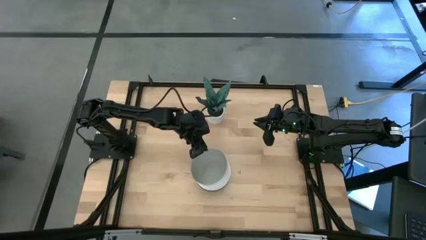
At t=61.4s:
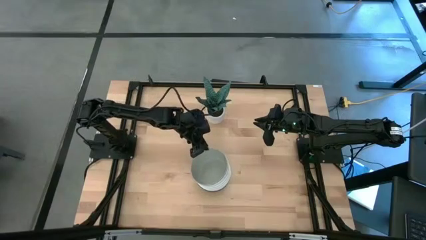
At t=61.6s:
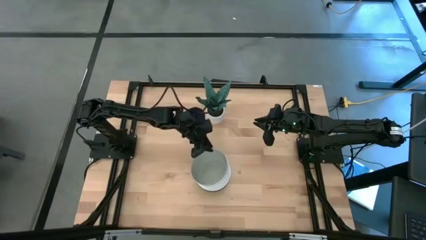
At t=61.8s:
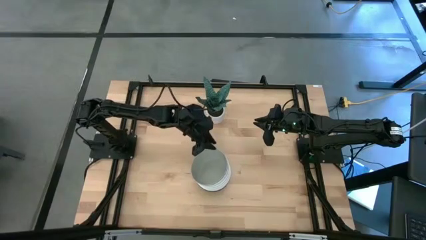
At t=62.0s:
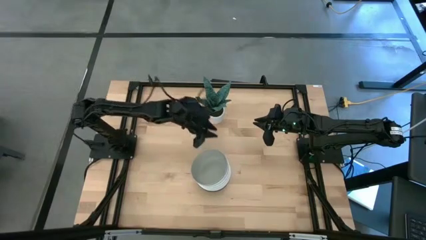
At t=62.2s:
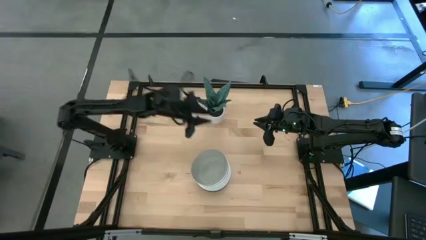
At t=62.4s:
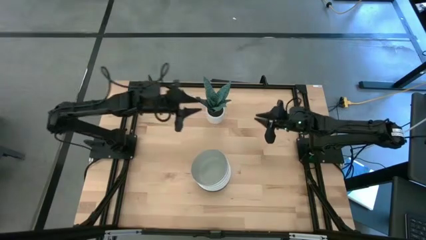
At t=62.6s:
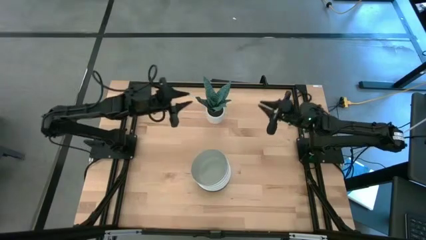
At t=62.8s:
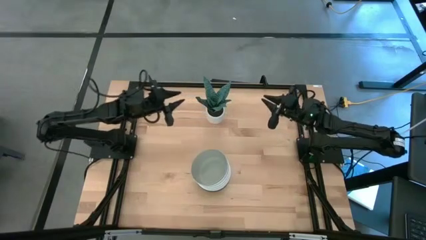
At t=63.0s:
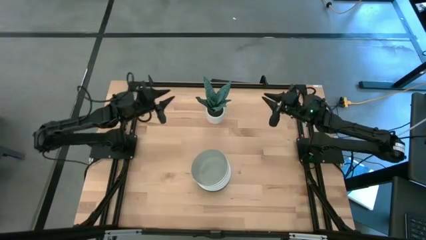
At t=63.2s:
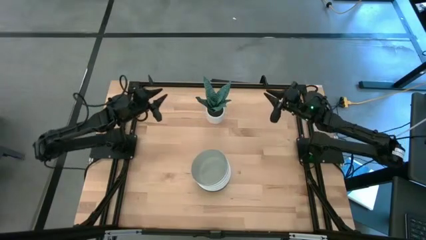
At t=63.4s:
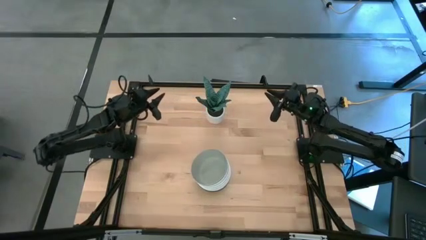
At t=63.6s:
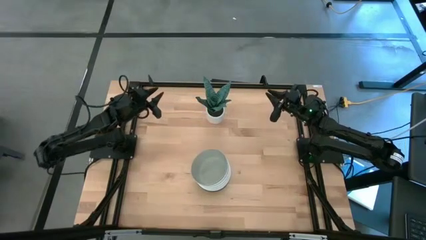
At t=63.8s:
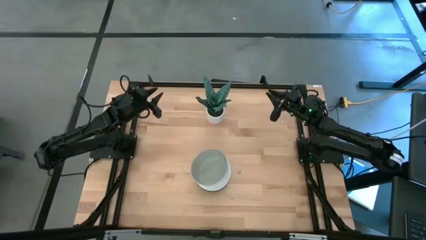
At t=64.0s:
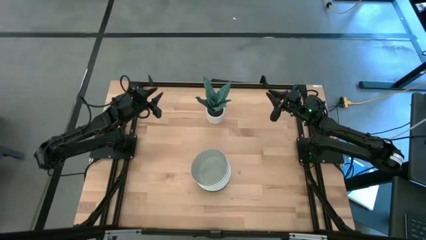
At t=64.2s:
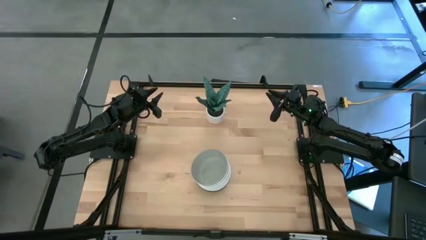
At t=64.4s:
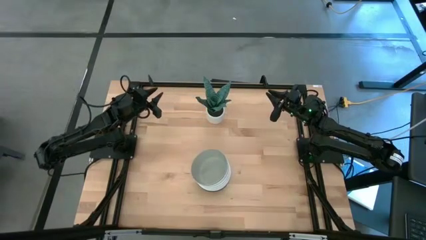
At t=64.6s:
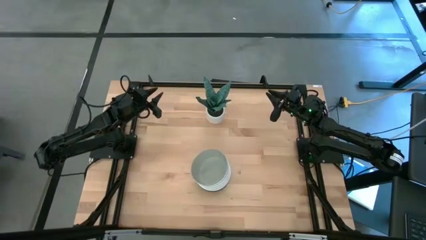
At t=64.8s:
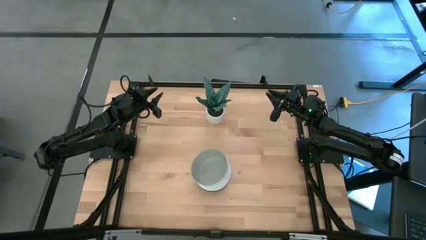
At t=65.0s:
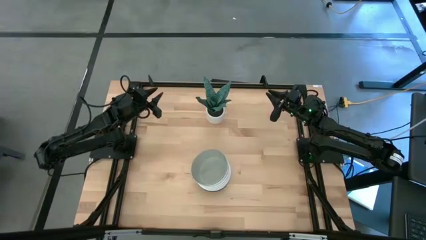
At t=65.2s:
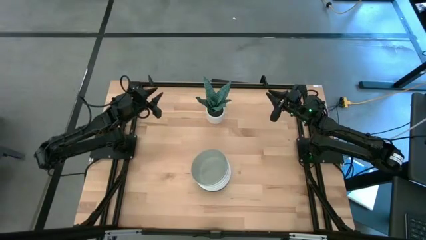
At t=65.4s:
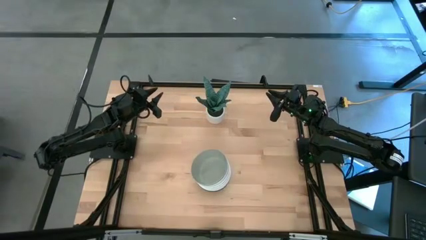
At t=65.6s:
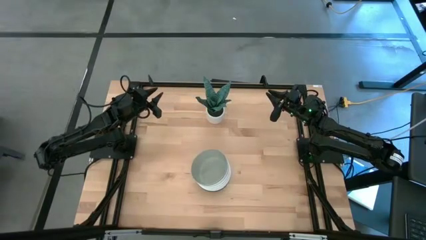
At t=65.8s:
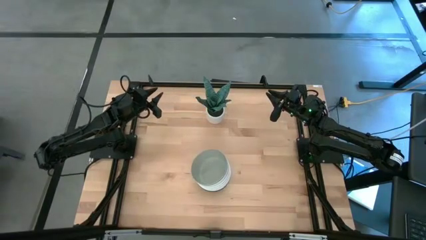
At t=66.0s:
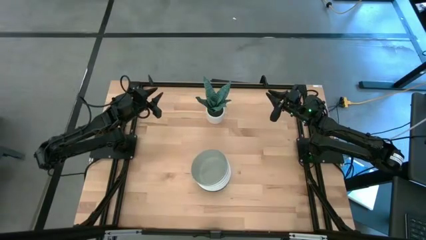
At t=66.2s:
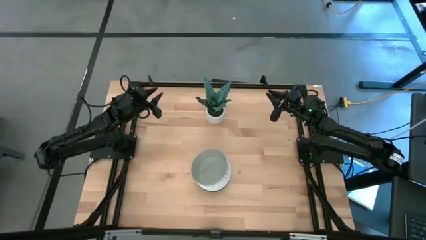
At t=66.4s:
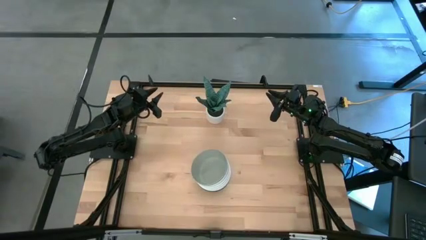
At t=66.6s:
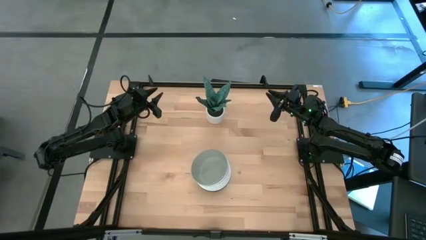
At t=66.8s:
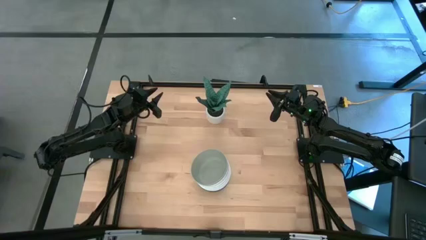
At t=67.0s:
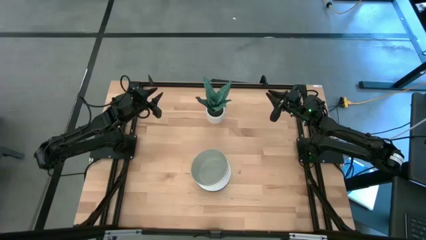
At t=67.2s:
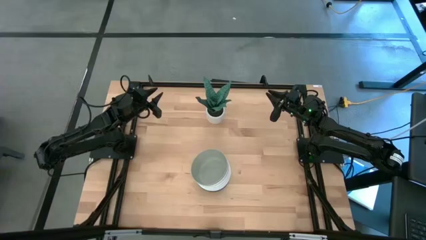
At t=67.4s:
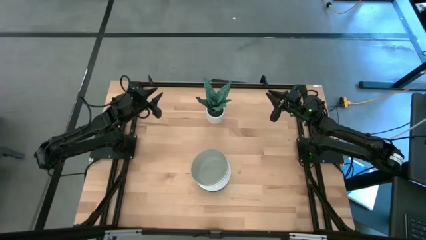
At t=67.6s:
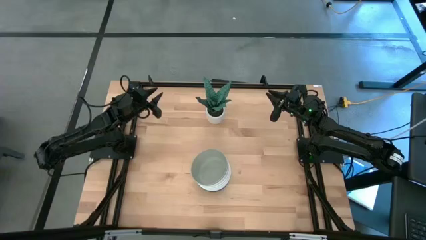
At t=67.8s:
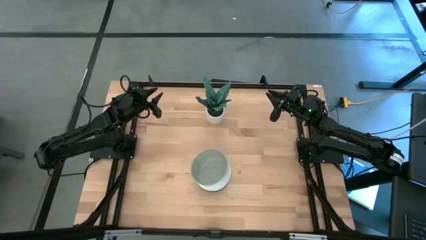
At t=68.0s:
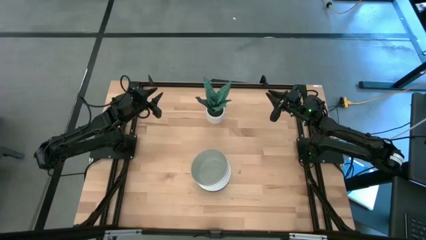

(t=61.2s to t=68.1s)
Task: Nest bowls inside each other
Return to Home Position

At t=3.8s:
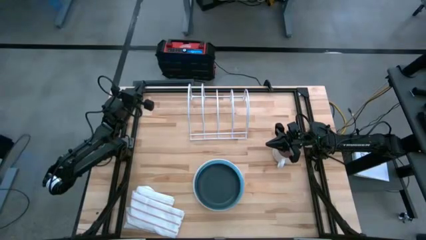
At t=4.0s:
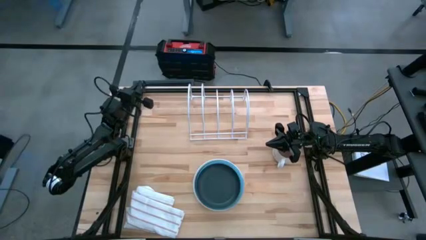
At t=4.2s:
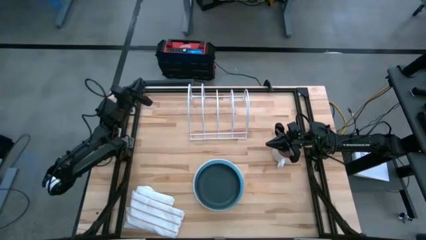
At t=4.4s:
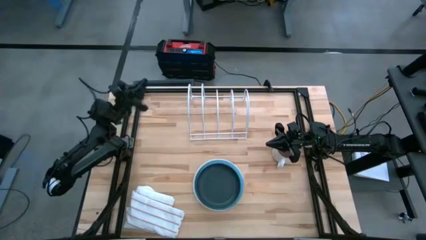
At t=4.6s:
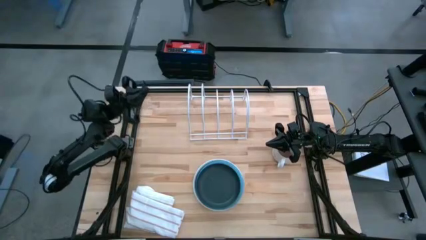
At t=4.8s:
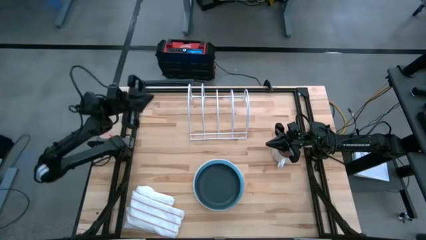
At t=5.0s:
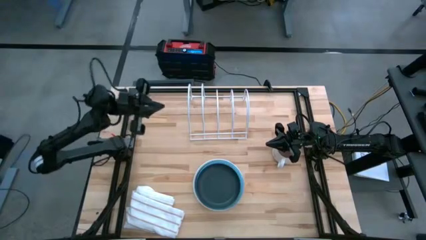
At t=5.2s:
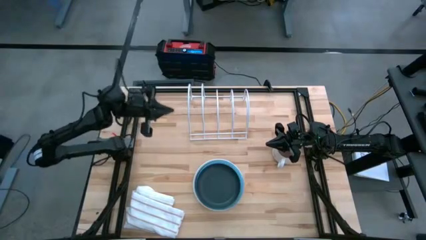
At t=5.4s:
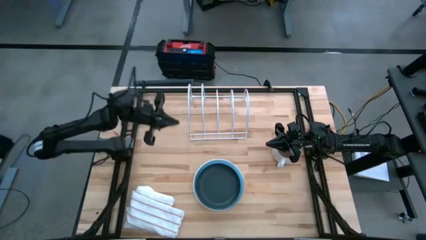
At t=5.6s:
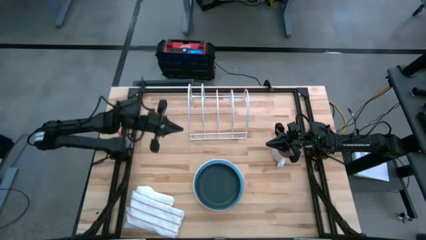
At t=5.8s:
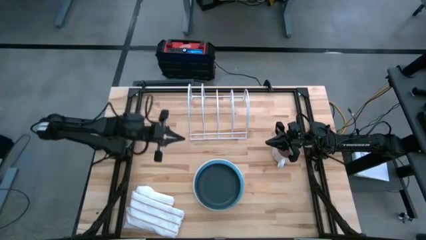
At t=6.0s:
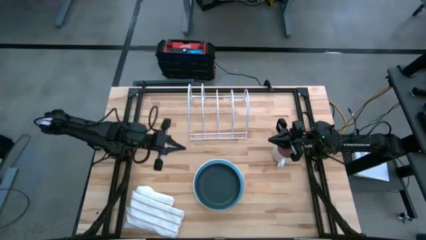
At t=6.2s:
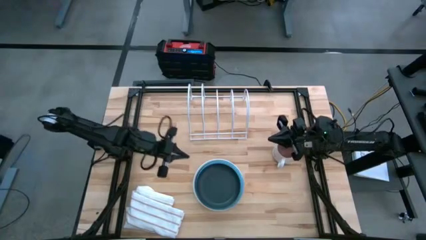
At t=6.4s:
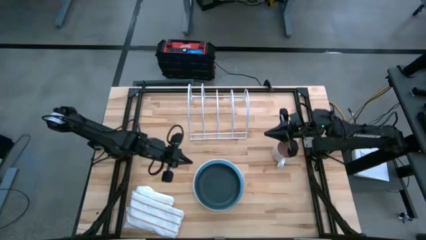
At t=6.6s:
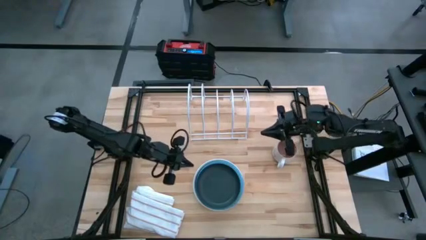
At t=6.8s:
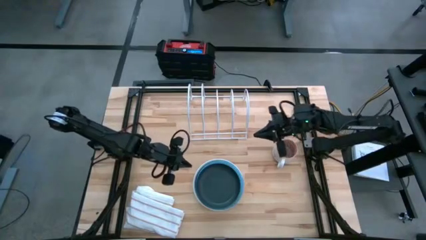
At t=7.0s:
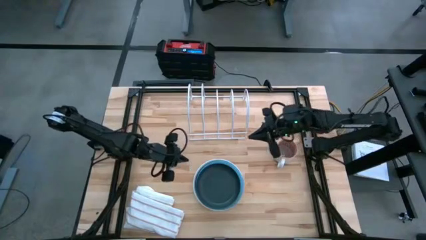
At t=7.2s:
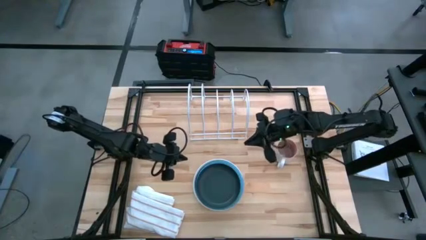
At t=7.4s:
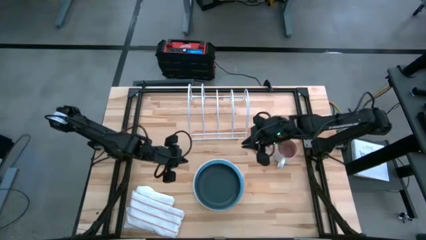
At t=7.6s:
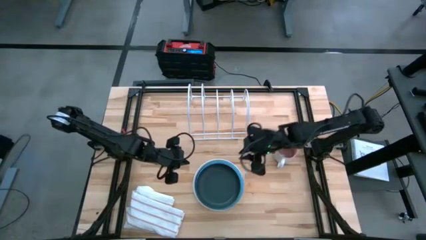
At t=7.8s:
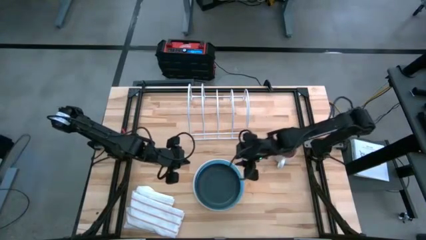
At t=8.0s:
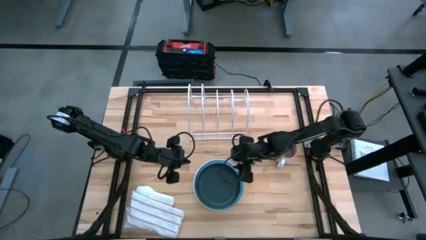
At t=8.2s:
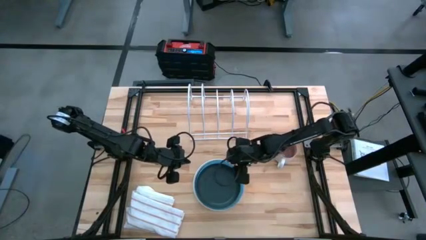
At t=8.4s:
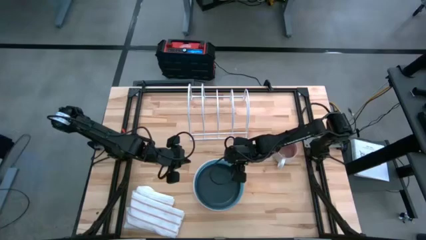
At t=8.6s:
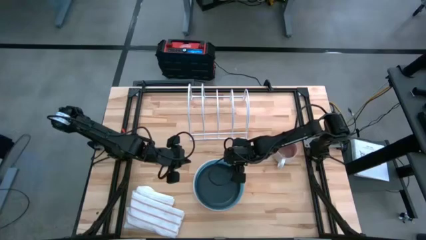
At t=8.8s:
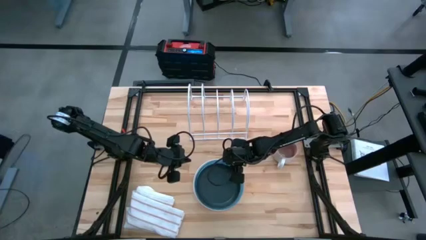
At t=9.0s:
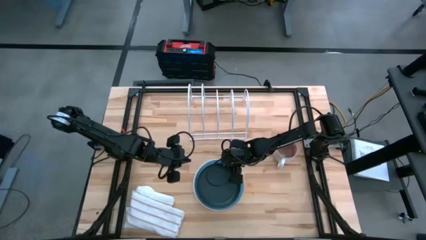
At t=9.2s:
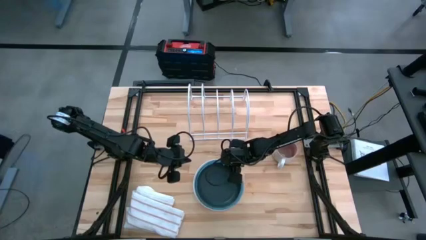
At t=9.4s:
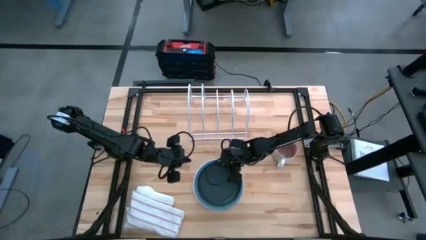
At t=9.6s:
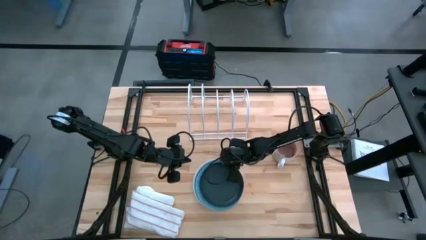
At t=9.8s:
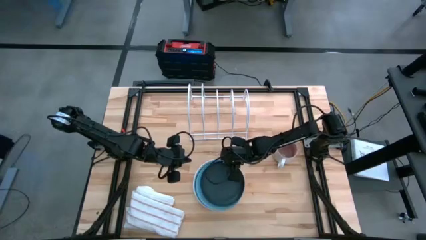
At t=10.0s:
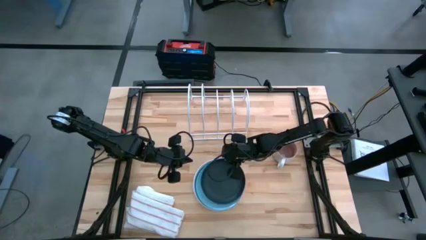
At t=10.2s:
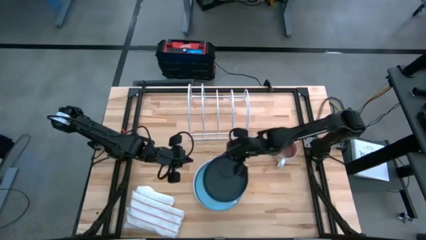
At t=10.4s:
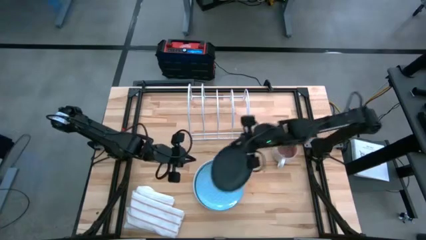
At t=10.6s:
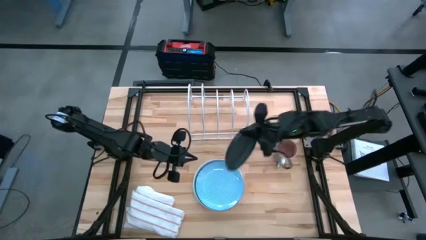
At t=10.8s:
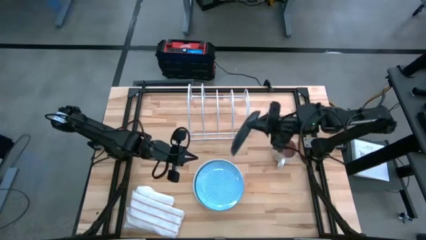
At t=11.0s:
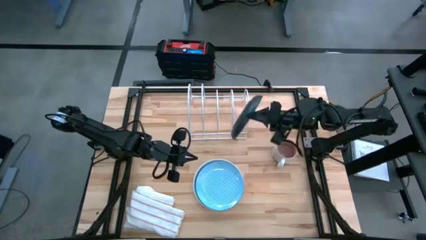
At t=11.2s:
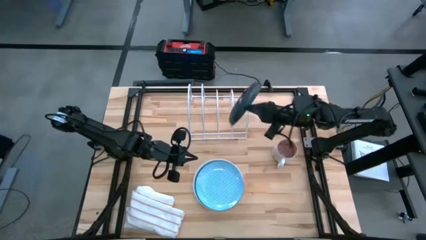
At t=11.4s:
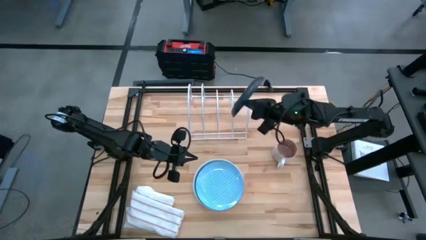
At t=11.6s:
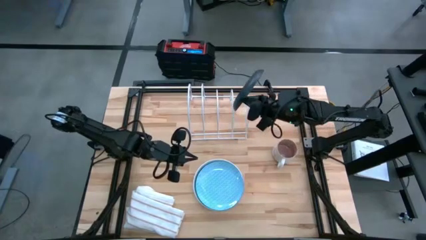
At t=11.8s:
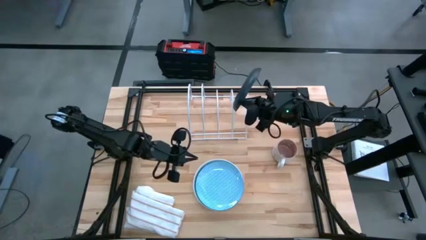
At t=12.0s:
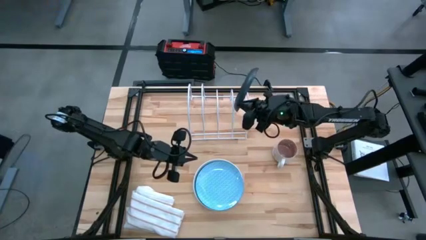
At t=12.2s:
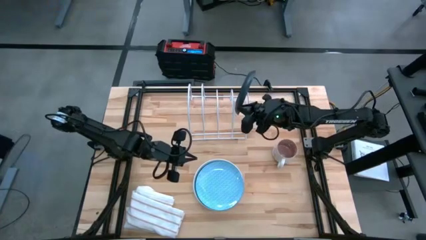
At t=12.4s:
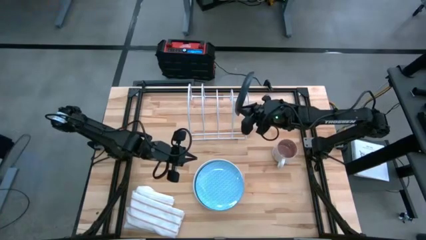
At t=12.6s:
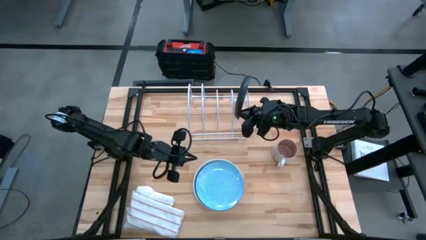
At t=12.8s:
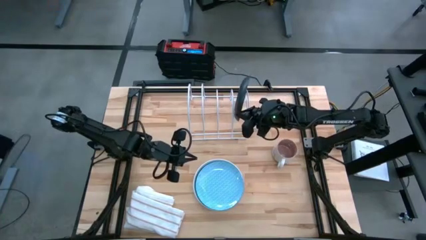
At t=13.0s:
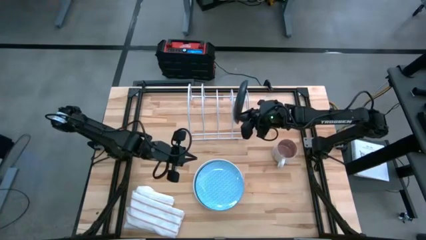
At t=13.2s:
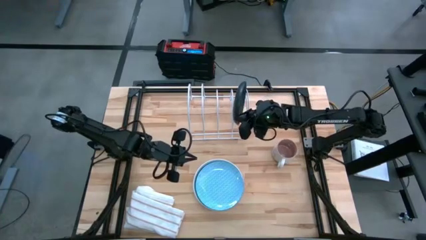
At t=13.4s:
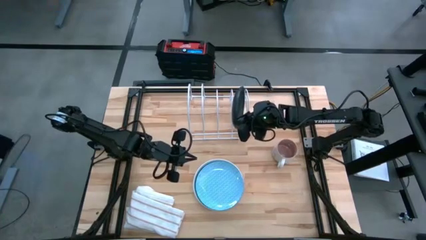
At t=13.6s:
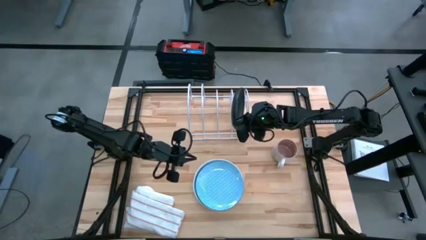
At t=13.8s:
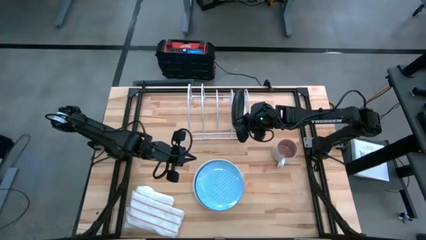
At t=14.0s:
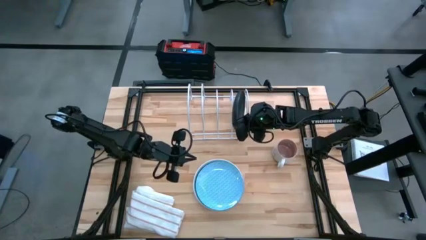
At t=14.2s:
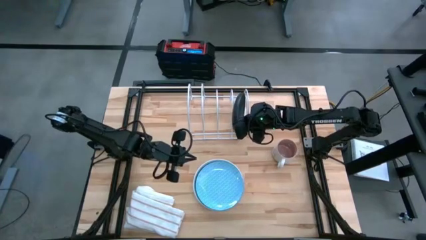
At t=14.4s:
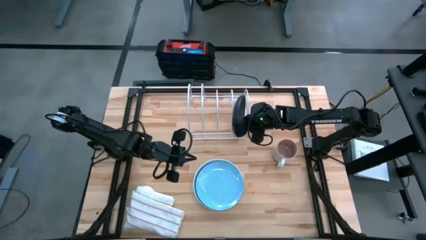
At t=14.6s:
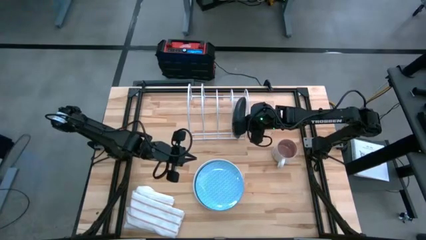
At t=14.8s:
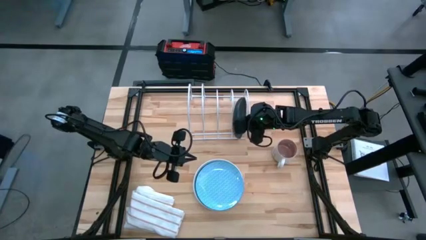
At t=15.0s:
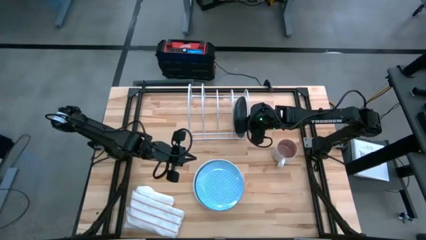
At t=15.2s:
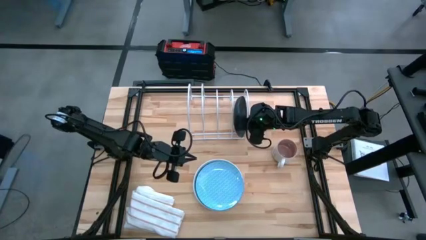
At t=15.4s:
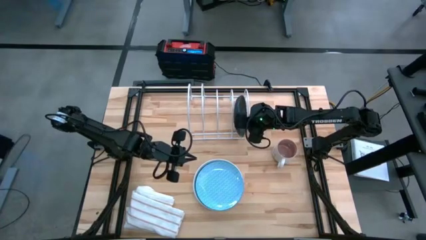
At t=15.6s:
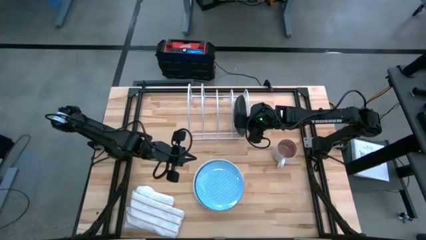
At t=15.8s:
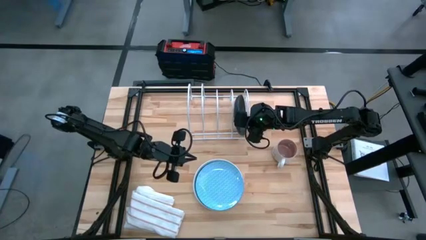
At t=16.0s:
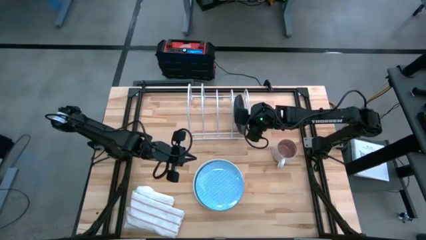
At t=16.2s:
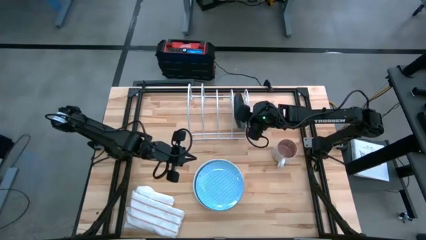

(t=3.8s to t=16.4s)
Task: Sort dishes
Put the black plate in the dish rack
